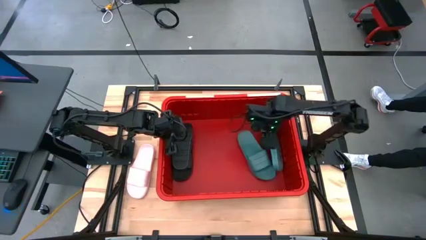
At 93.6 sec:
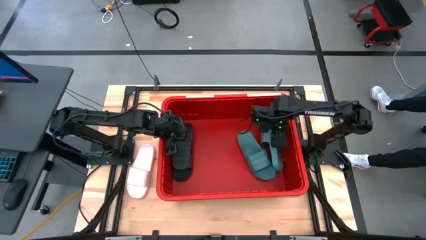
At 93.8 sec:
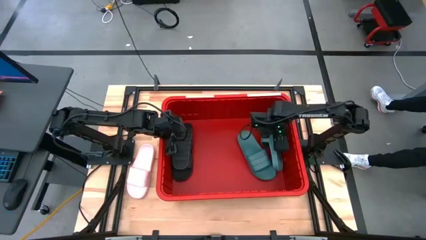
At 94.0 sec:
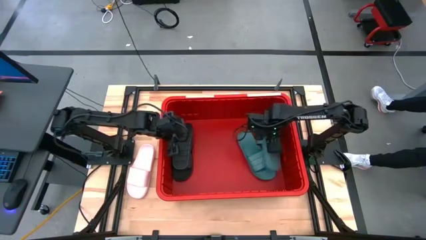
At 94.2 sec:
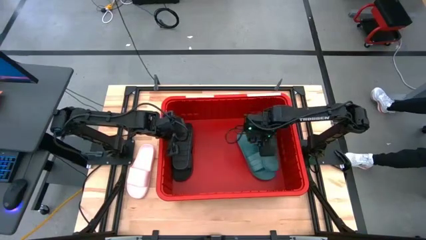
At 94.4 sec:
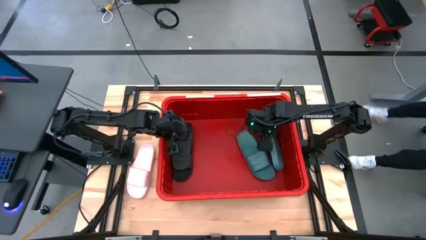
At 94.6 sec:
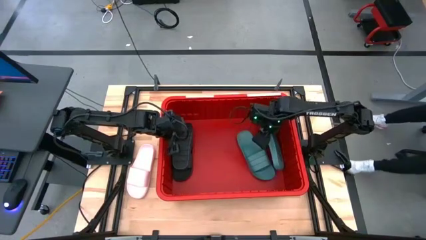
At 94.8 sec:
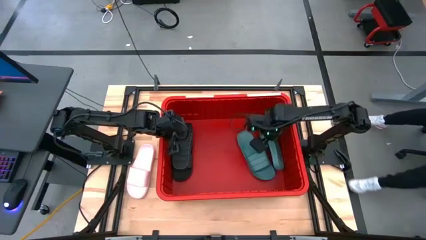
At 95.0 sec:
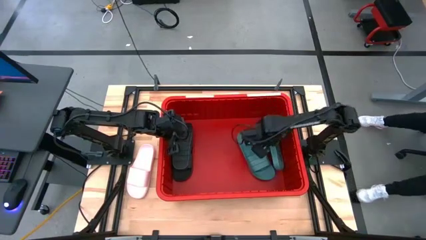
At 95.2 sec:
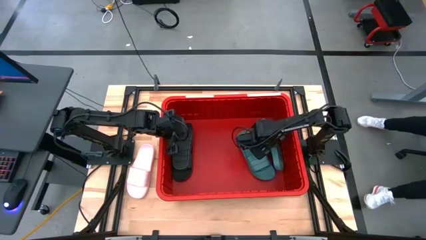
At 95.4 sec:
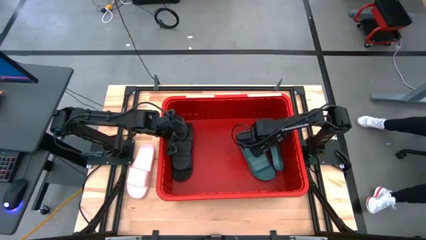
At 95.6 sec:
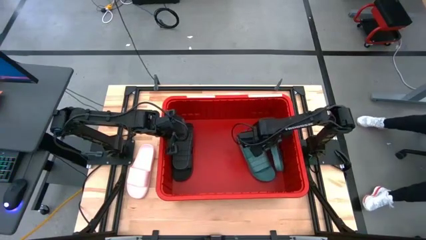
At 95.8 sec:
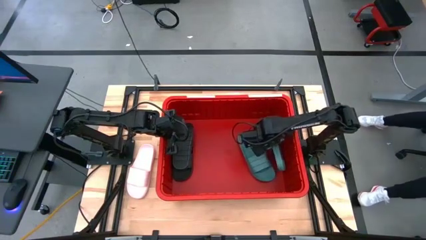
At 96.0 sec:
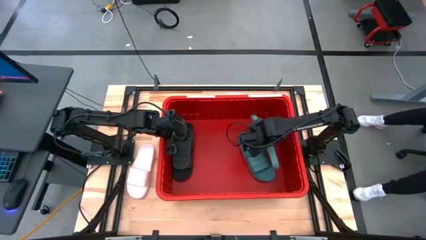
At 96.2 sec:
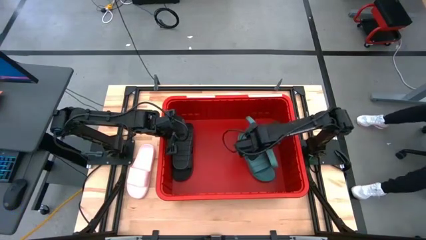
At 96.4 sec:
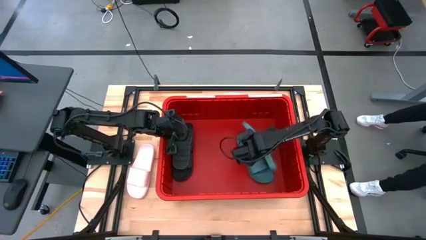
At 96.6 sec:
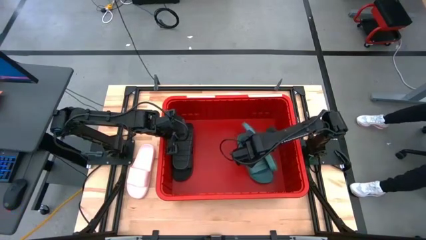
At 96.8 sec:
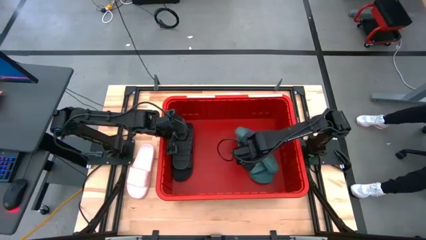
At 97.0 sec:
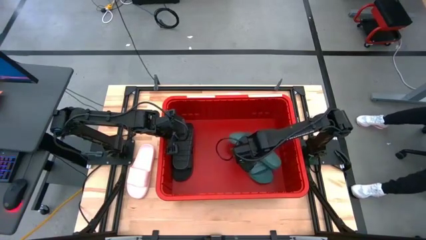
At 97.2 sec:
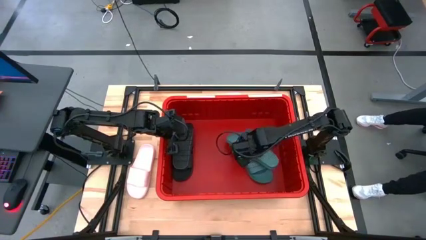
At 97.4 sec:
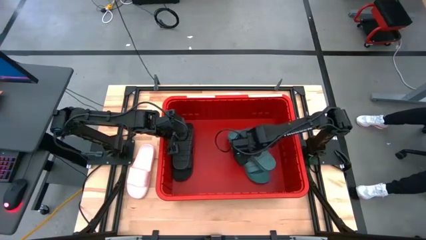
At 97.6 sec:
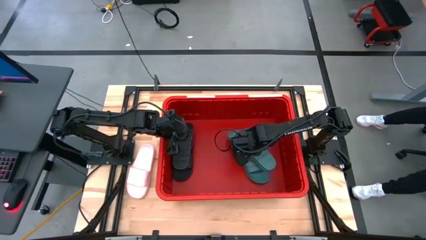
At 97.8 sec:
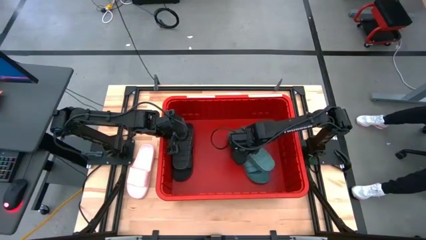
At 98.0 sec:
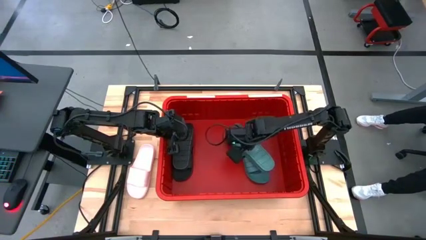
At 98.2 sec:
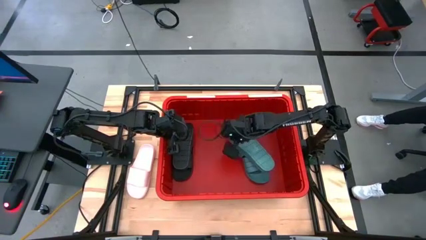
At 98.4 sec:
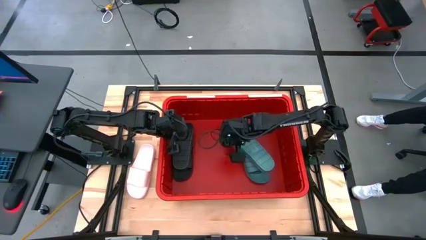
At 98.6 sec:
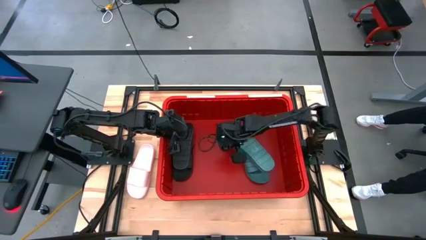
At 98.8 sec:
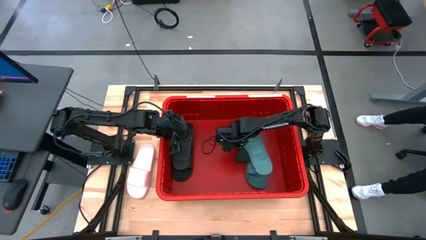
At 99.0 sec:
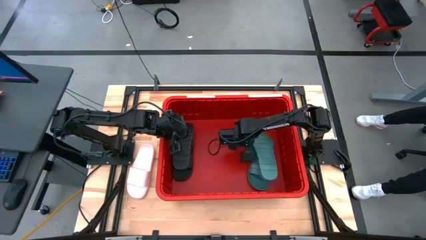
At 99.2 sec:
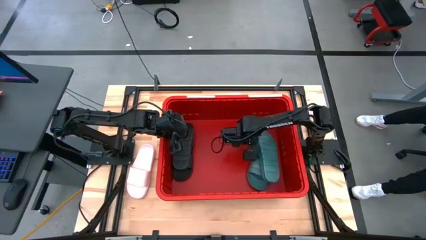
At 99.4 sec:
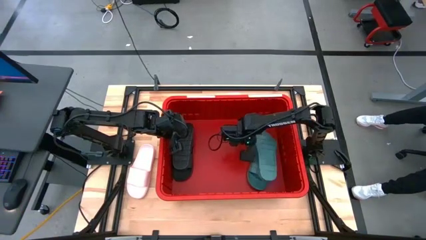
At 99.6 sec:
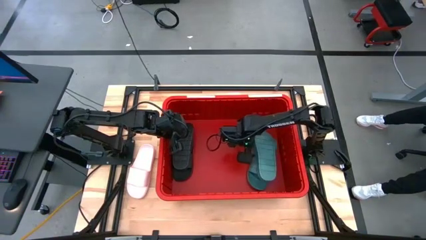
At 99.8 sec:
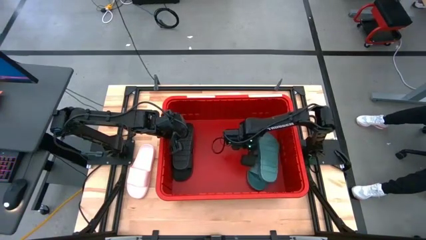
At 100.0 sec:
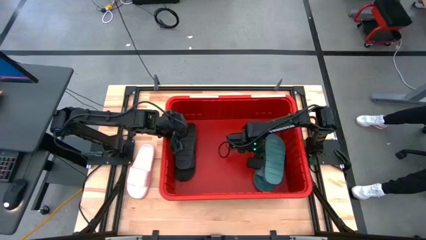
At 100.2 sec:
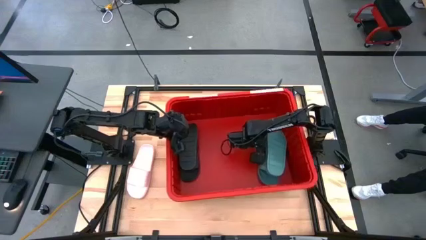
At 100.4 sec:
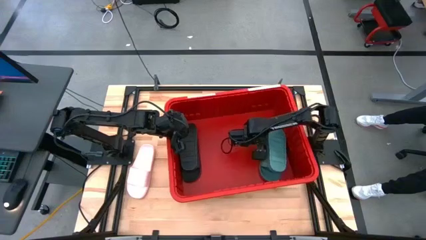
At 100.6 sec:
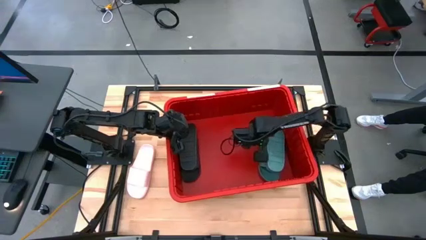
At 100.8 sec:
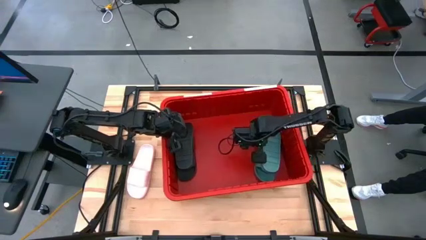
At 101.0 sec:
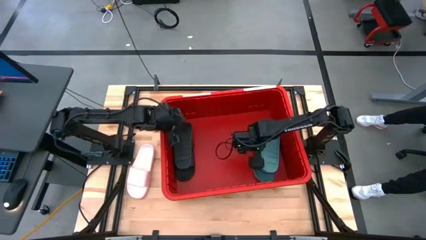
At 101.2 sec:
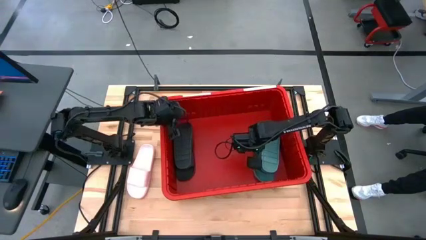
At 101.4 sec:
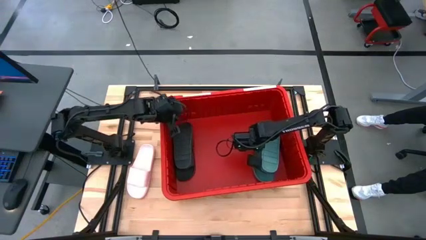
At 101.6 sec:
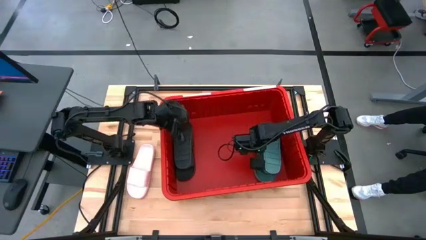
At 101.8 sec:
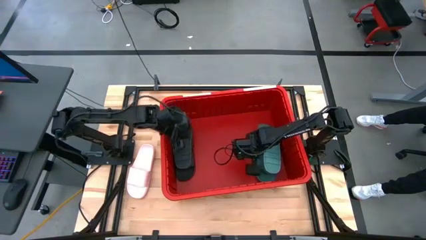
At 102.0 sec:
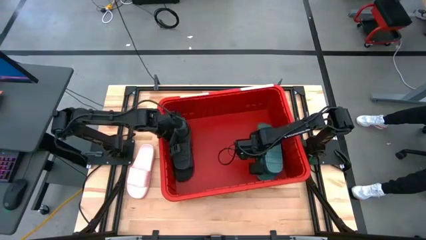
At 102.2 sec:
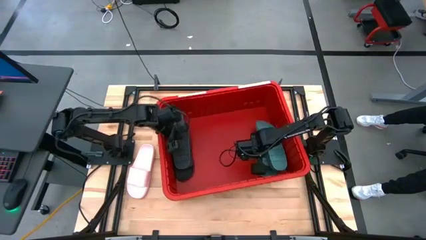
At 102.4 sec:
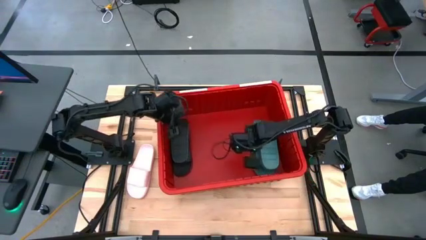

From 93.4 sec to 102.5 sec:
Task: Pick and place slides into bin
Stack the green slides on top of the other green slides inside the container

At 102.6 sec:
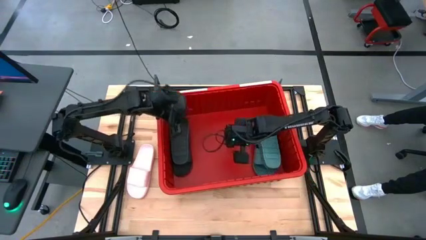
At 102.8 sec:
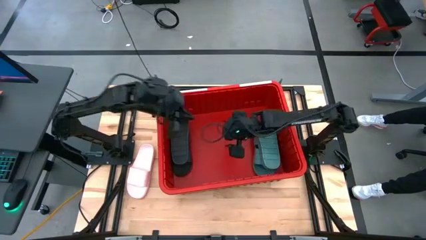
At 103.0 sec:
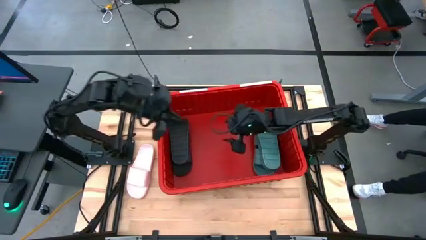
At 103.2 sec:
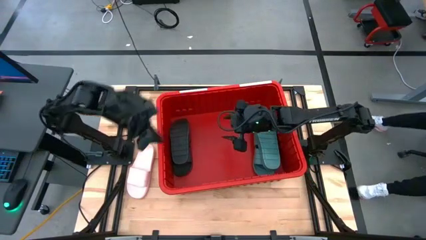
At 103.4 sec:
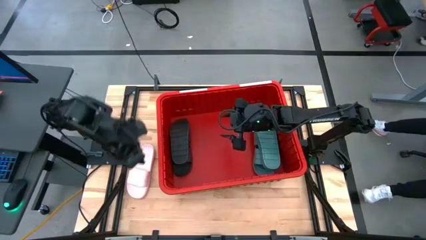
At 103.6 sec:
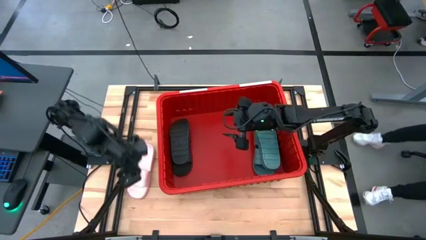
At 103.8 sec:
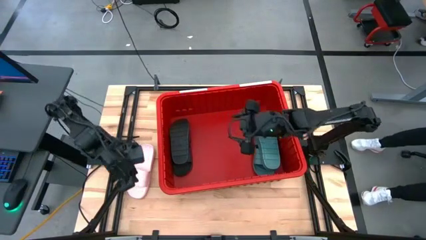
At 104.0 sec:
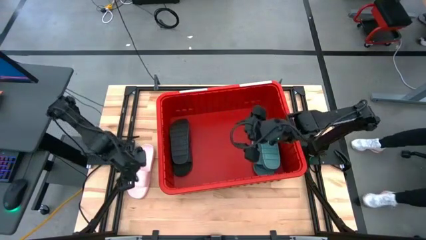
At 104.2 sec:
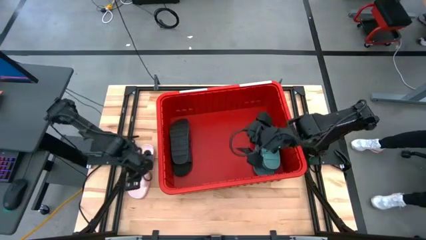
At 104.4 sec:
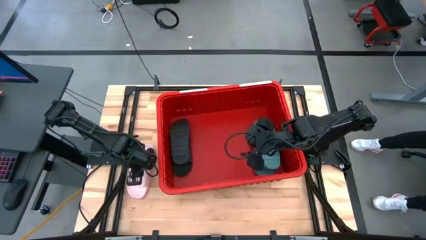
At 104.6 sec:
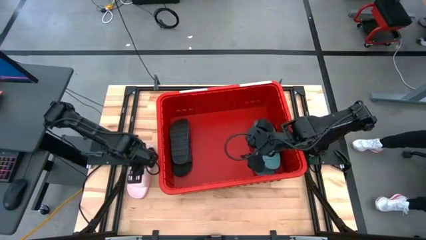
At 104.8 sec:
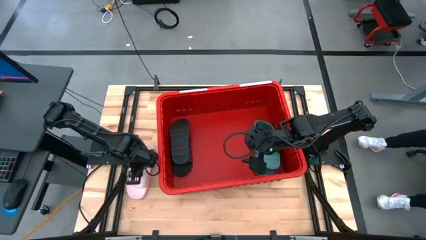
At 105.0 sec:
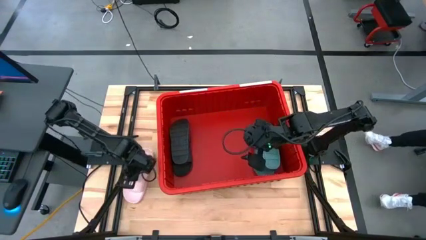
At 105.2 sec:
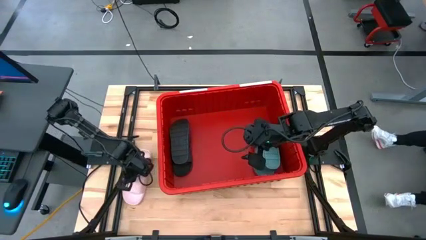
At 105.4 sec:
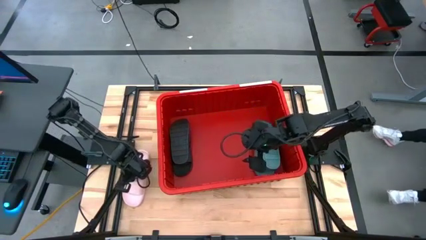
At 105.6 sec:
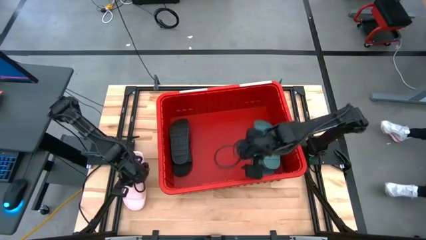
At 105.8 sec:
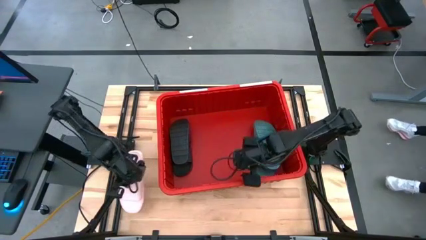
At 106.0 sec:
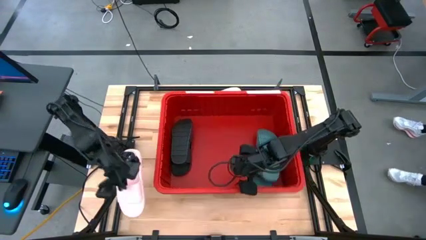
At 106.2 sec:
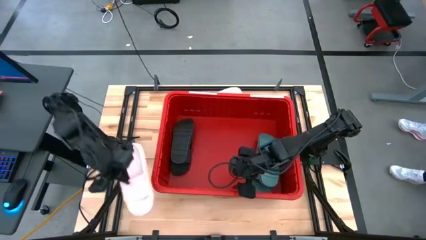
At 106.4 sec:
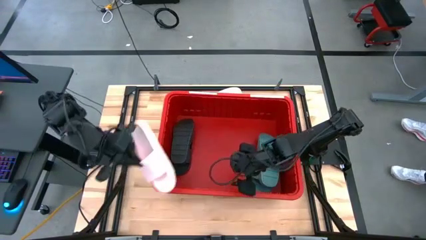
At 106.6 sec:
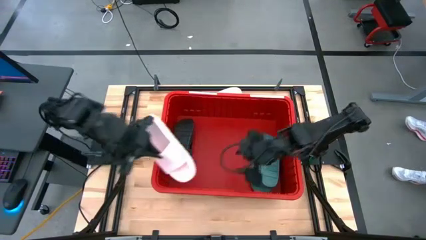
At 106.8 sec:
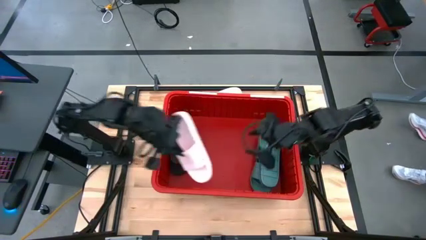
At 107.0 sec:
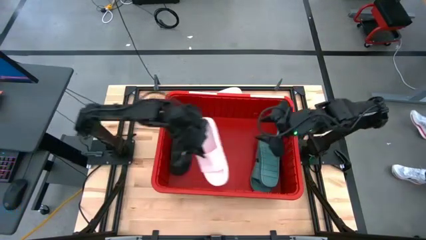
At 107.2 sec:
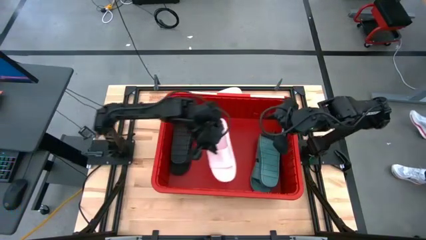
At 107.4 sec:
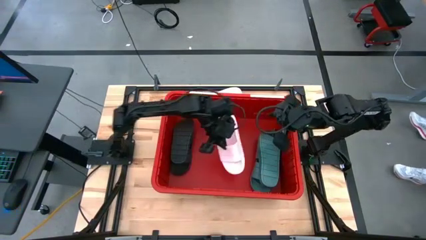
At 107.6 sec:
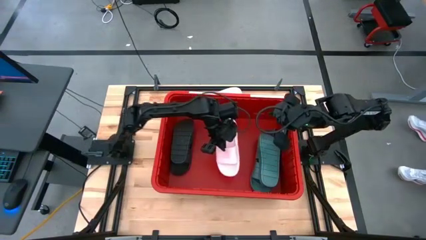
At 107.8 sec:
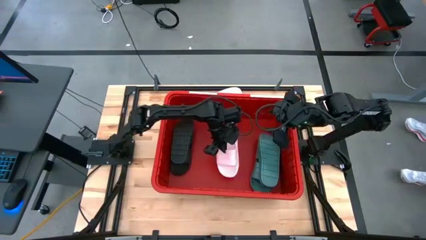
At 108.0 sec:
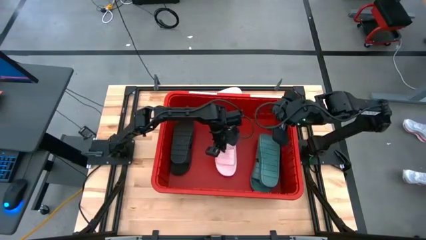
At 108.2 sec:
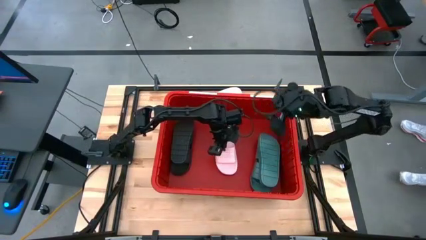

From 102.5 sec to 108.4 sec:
Put the bottom pink slide into the middle of the container

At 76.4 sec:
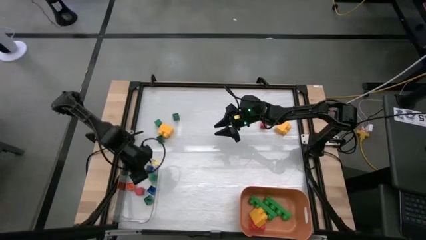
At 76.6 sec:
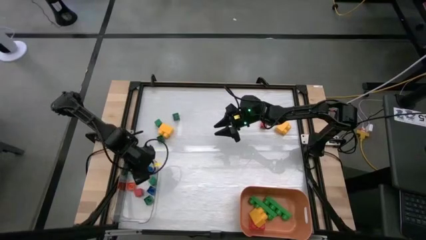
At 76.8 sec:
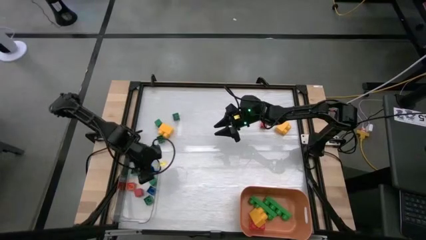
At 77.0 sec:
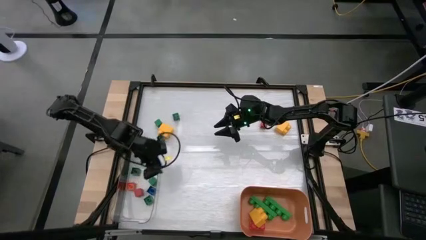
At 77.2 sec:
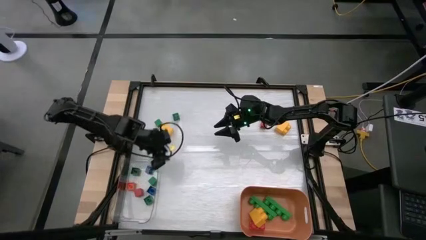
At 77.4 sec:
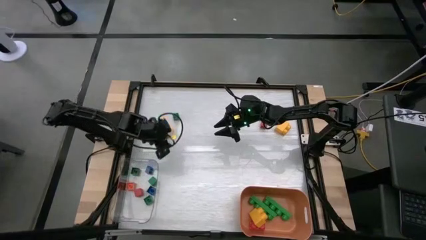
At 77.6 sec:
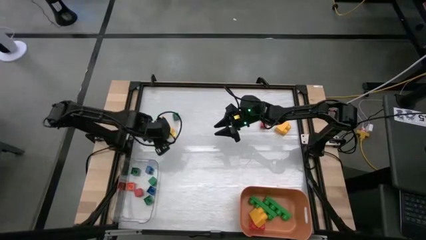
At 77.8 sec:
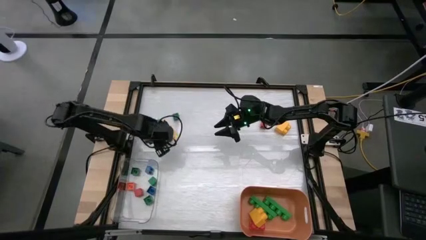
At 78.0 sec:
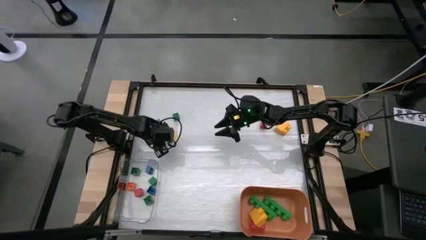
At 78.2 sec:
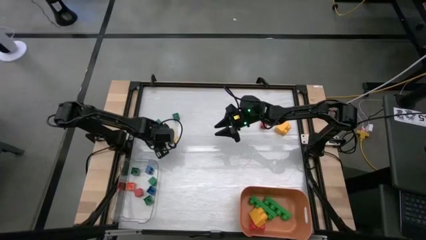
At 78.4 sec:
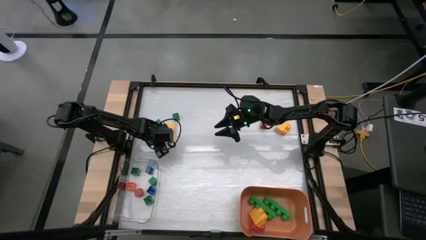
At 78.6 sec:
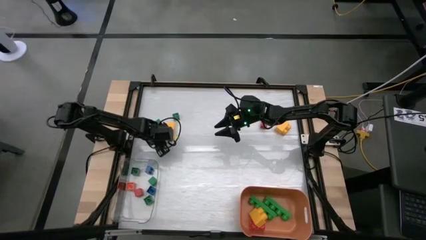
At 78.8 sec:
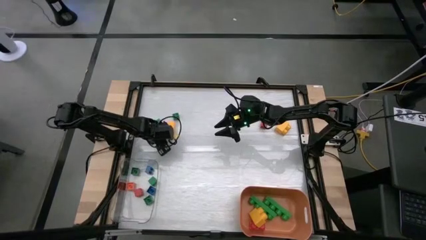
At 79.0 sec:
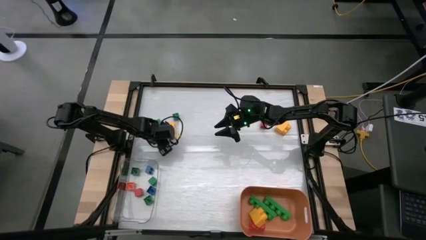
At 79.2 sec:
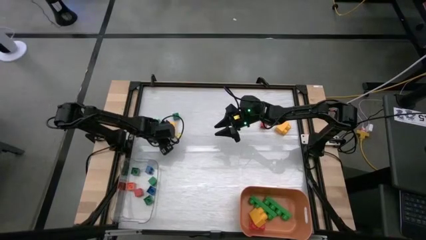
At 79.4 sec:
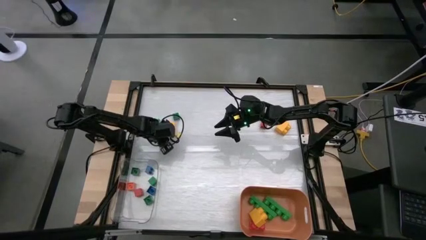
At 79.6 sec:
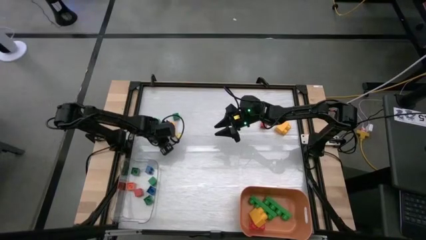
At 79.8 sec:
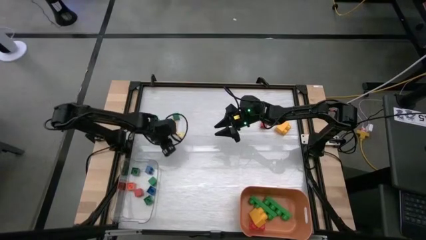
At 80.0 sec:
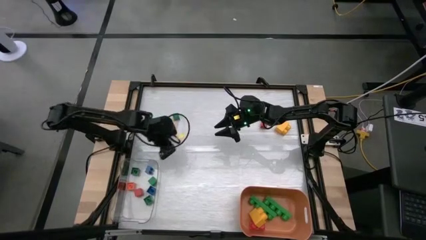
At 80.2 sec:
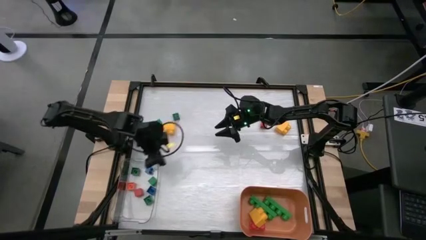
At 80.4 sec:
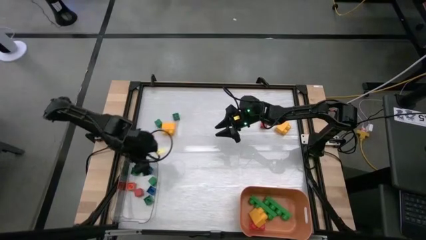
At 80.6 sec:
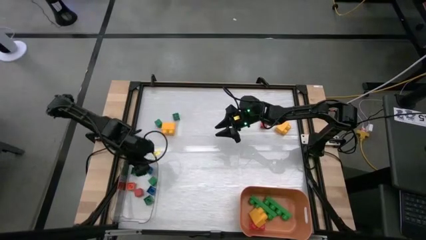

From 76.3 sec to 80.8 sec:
Task: Sort blocks by size
Put the small green game piece into the transparent bin
